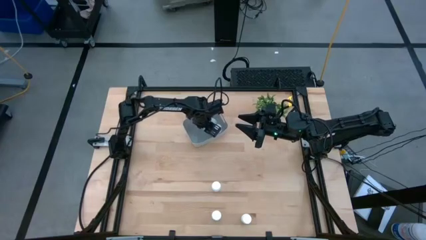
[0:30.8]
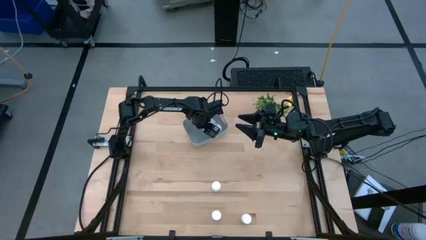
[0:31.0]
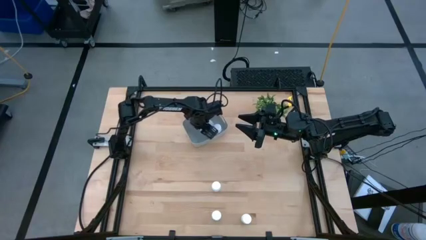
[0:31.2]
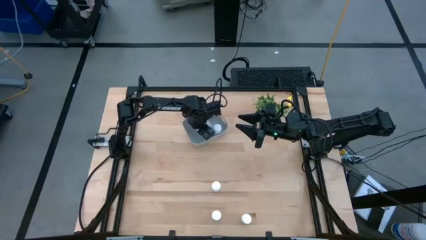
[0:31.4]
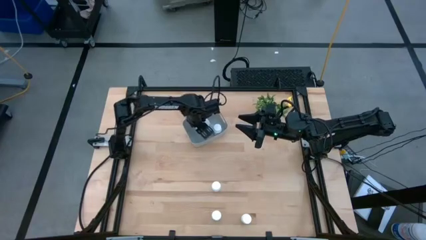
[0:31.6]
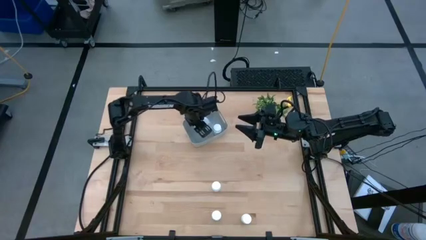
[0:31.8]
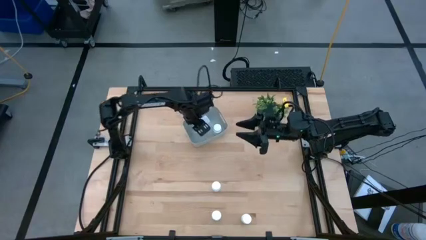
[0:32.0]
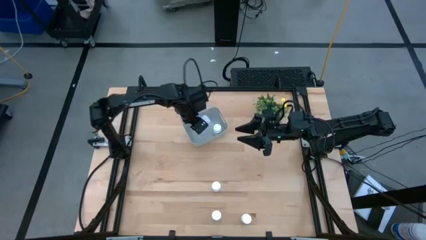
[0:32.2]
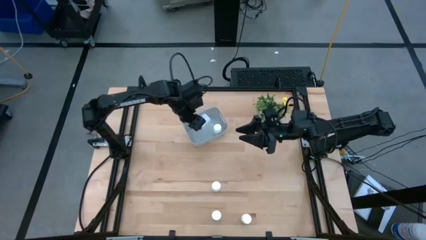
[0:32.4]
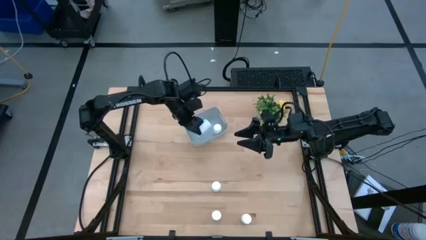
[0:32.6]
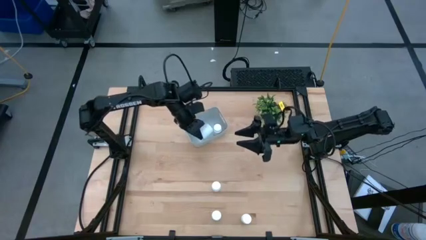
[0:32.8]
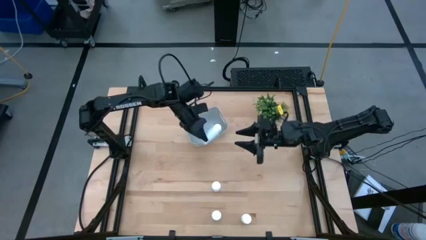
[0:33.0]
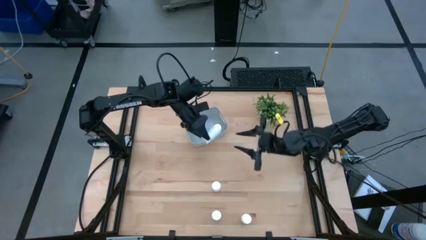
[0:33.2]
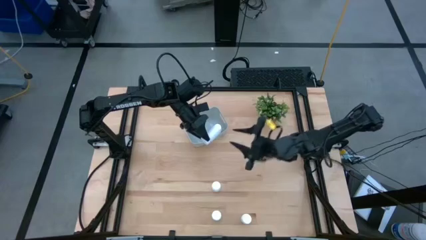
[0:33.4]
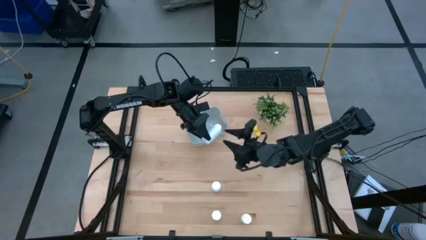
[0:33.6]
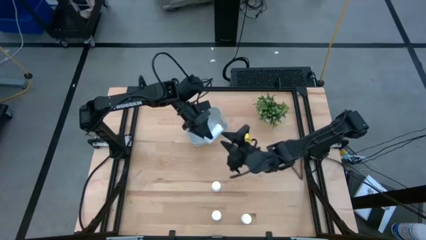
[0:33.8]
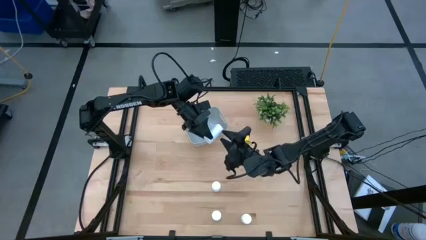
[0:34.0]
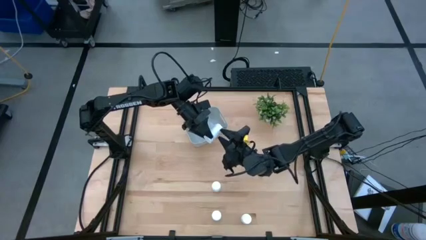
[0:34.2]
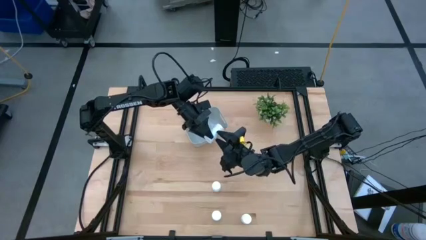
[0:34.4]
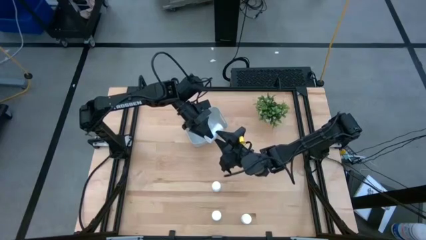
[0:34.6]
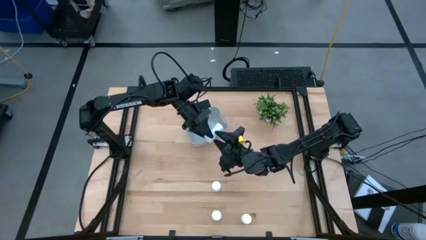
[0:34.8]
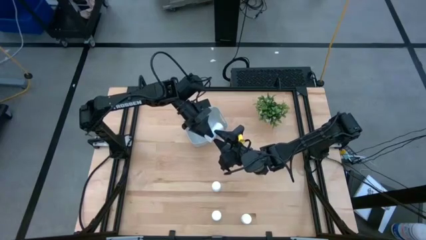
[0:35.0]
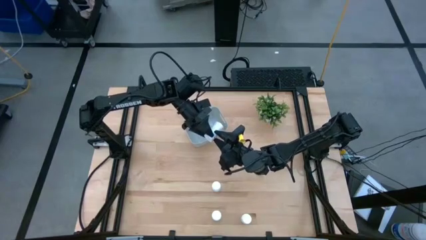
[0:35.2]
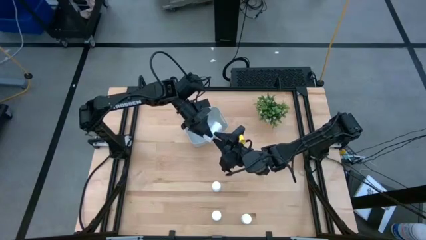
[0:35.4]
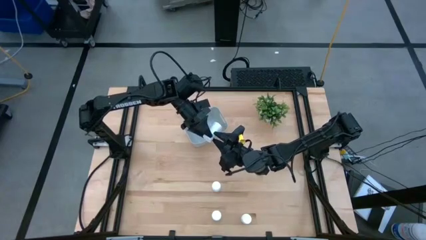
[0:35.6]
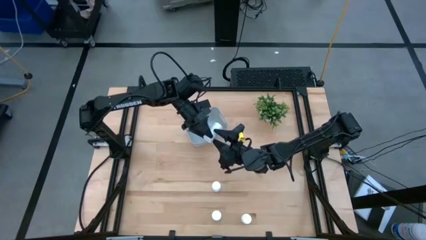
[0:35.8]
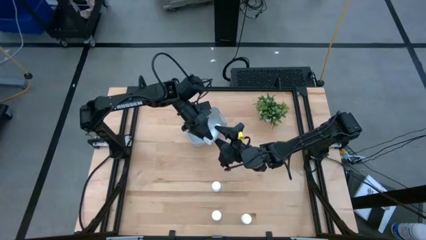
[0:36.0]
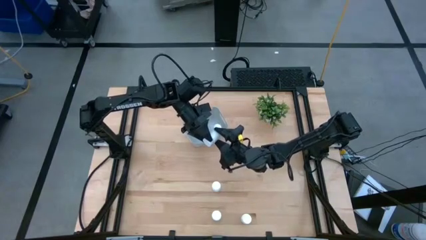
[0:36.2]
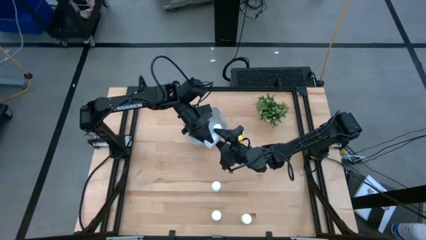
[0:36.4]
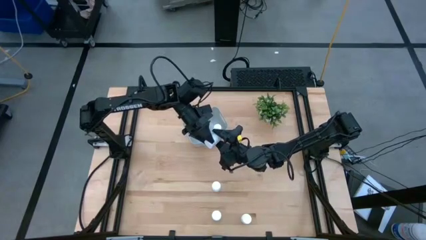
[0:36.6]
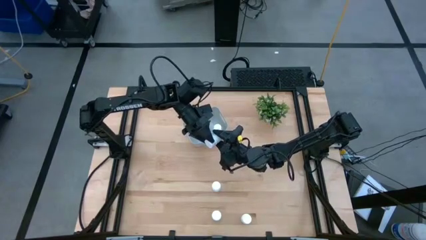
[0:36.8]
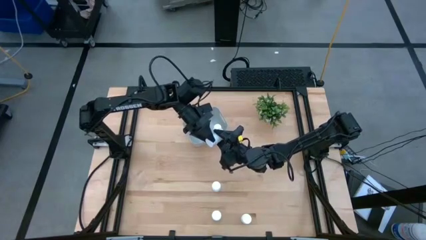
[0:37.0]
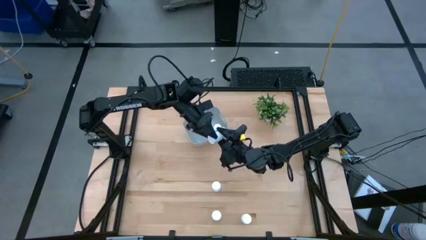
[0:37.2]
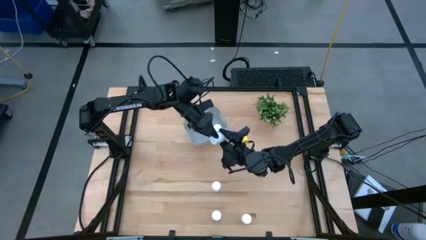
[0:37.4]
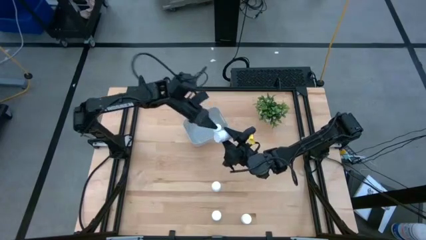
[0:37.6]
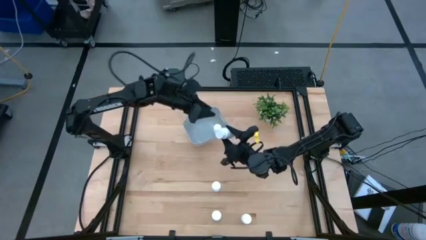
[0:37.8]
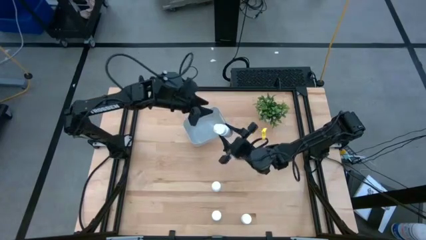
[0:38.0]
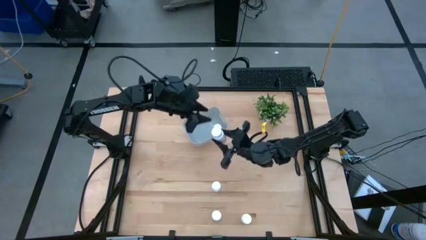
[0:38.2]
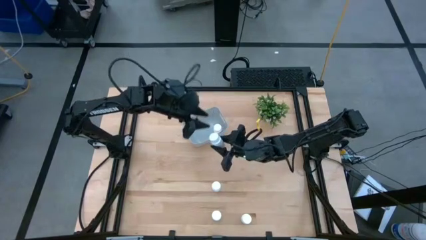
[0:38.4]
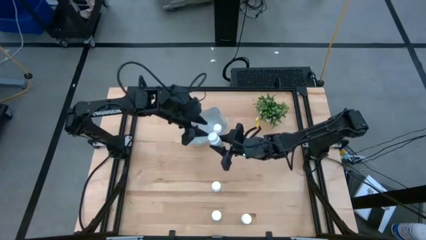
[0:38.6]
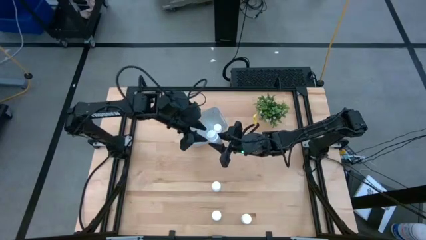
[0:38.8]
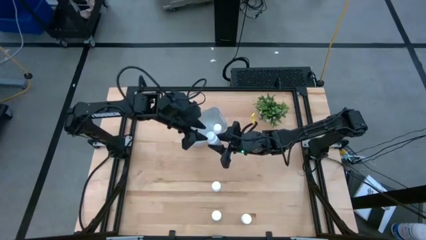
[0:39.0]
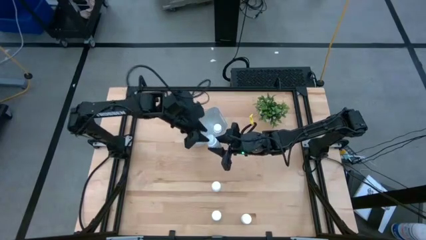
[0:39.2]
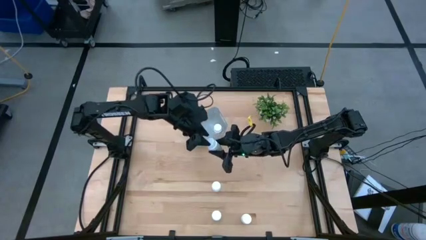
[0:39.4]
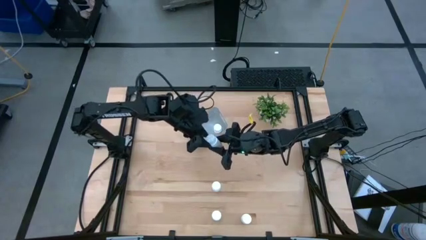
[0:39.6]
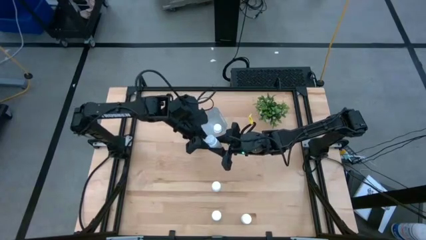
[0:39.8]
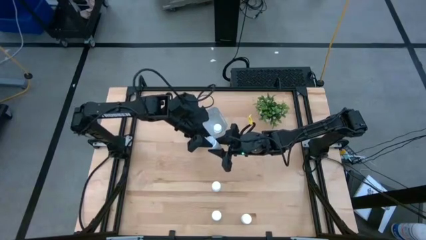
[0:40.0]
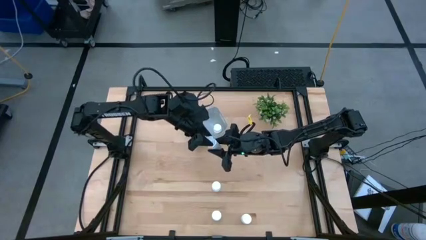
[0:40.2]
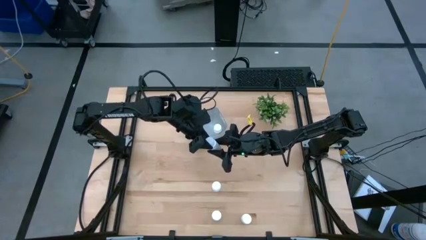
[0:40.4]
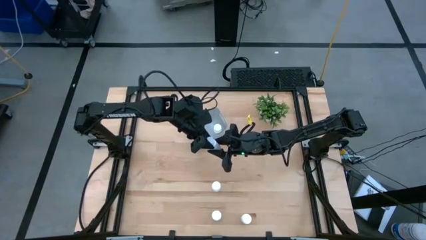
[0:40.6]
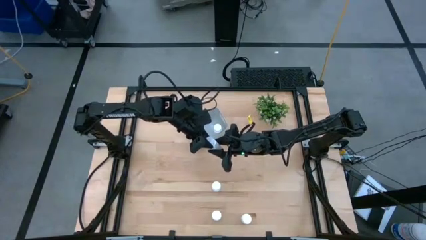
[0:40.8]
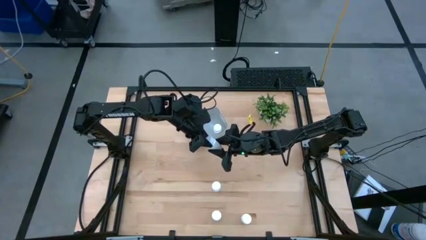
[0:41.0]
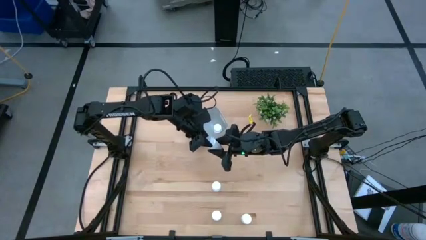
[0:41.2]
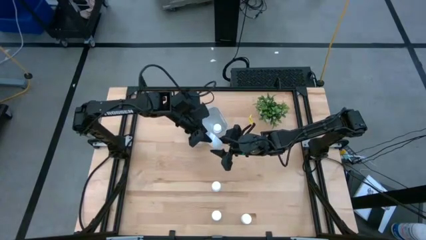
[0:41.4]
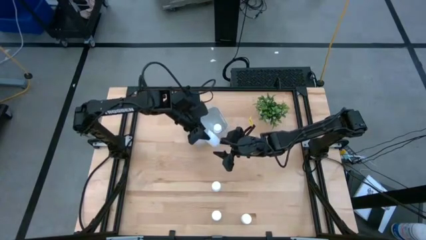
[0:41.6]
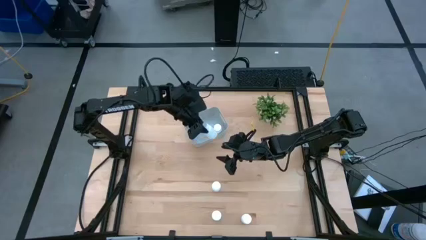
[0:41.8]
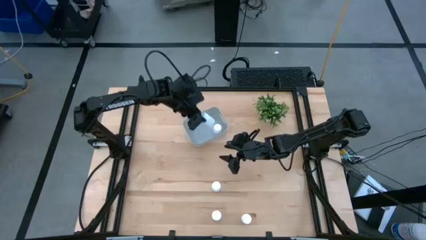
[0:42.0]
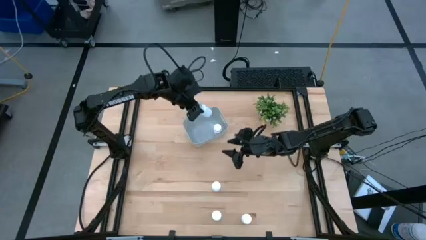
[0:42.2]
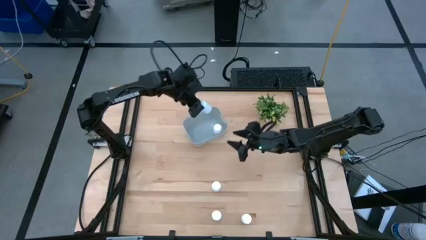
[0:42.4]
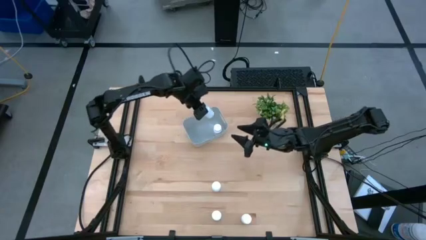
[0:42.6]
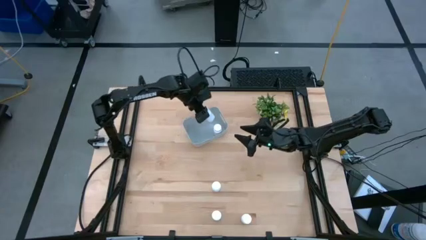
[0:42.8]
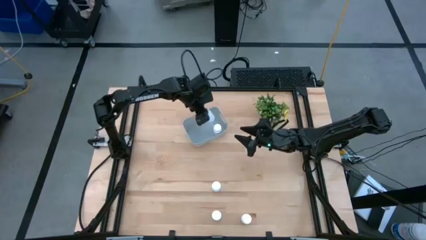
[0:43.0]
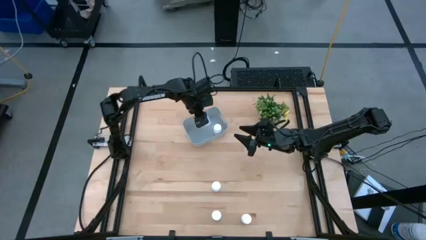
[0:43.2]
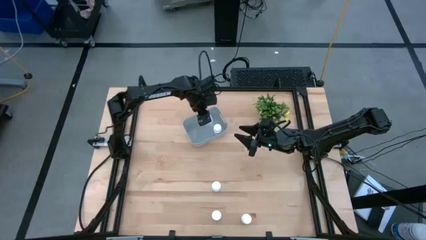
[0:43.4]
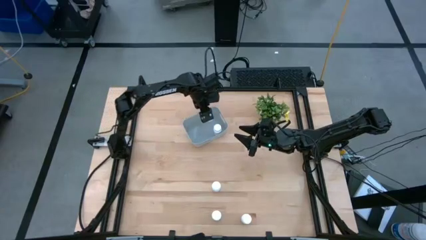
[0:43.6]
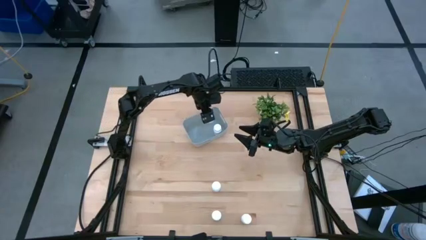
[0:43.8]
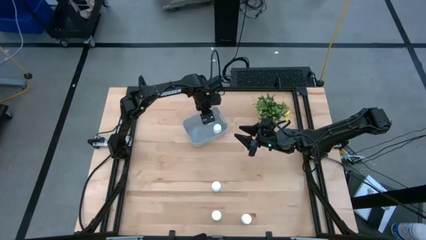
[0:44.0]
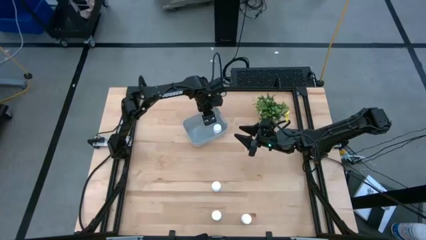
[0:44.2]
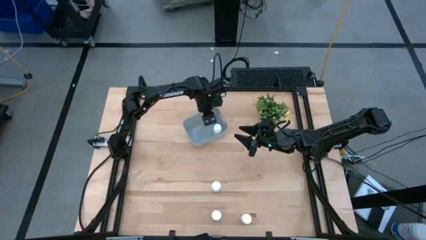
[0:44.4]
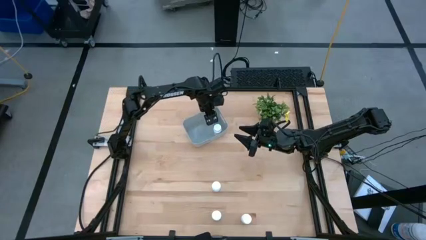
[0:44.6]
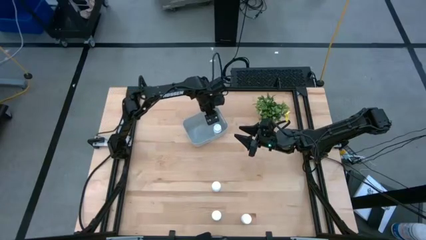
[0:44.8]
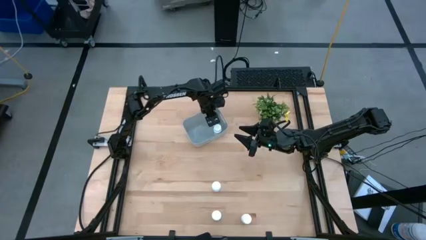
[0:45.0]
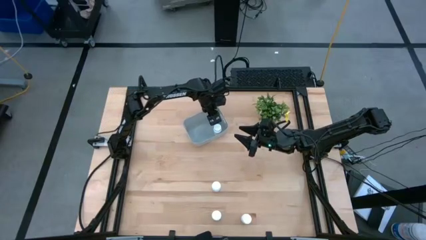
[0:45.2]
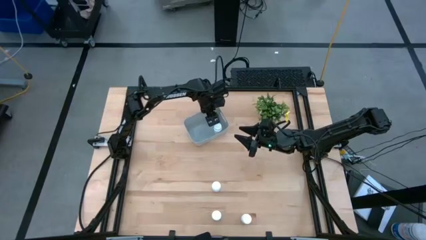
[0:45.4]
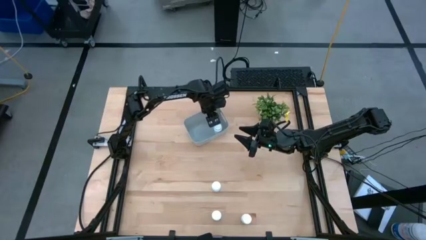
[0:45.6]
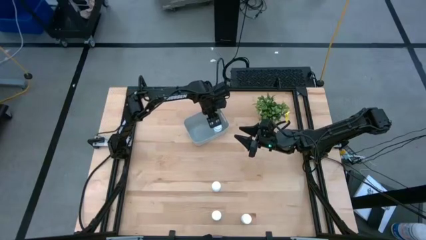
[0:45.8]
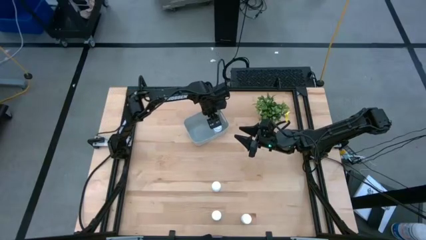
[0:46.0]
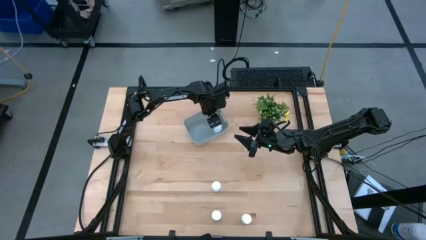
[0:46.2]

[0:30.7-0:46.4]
Task: Pick and place pill bottles into a basket
Put the white pill bottle into the gray bin
